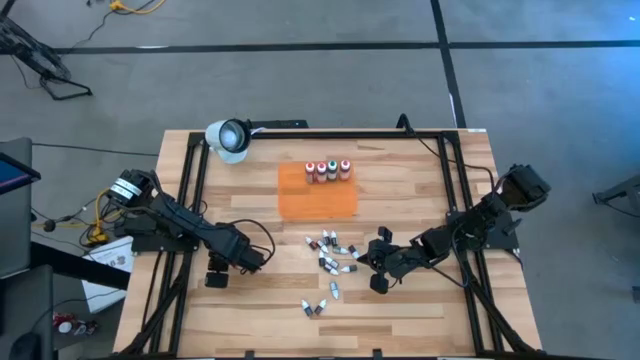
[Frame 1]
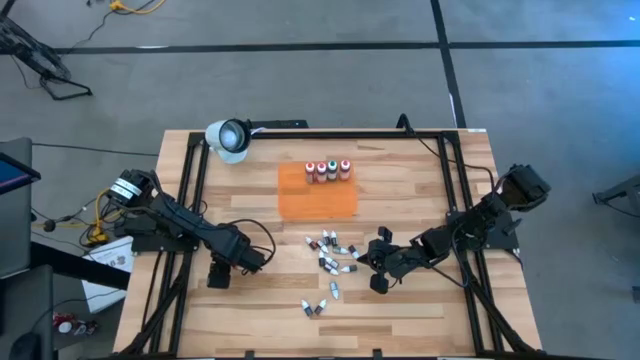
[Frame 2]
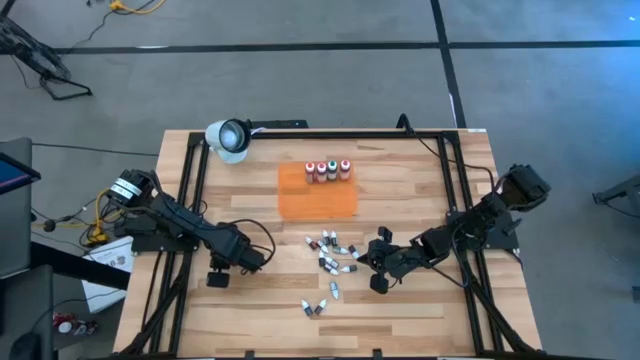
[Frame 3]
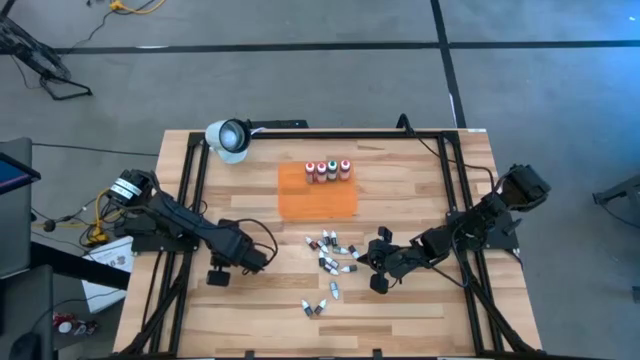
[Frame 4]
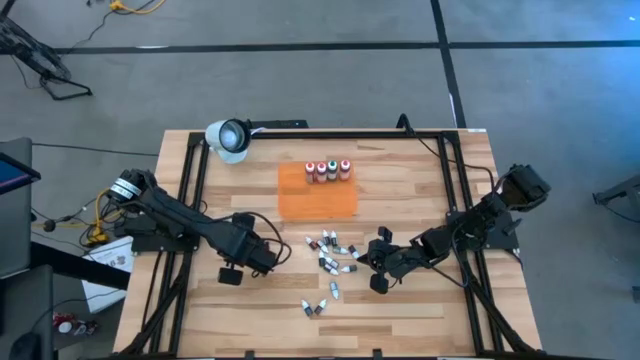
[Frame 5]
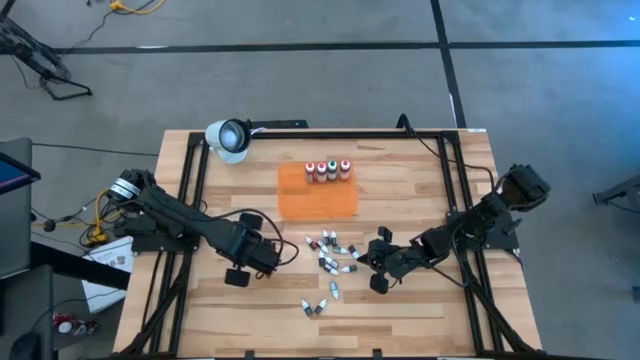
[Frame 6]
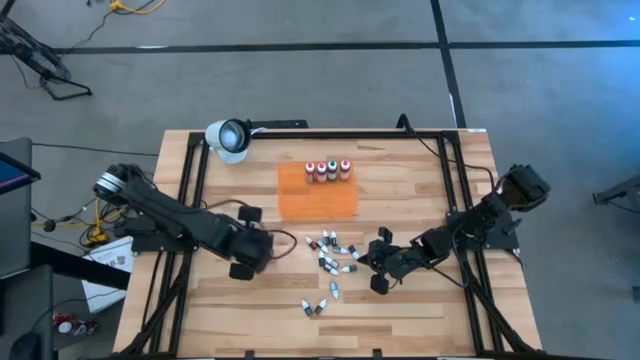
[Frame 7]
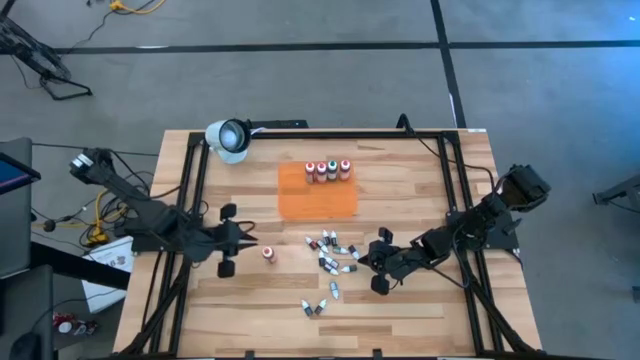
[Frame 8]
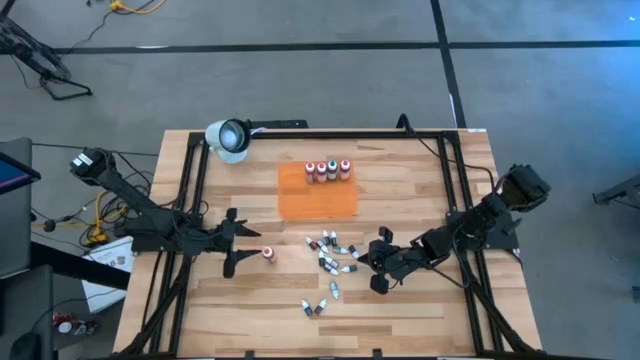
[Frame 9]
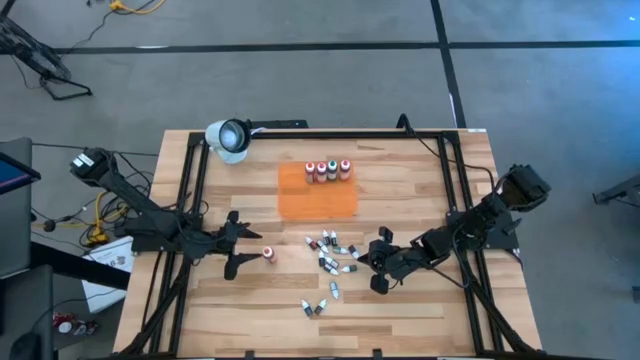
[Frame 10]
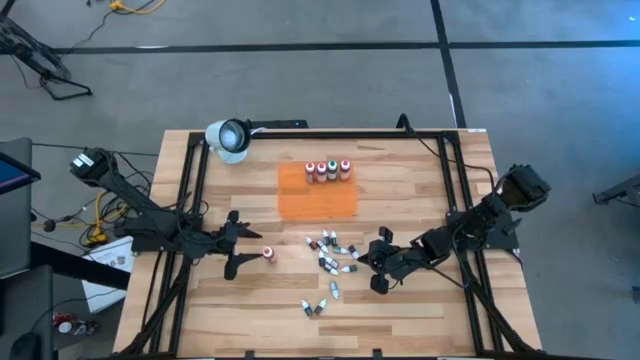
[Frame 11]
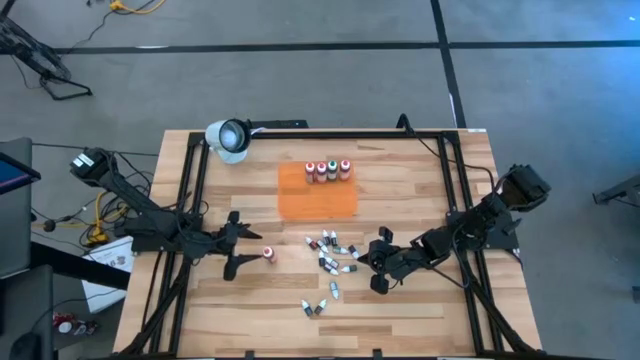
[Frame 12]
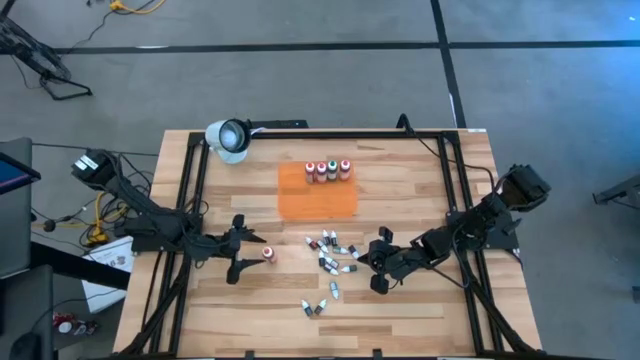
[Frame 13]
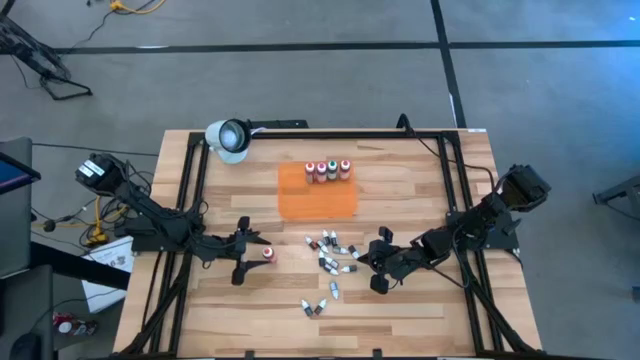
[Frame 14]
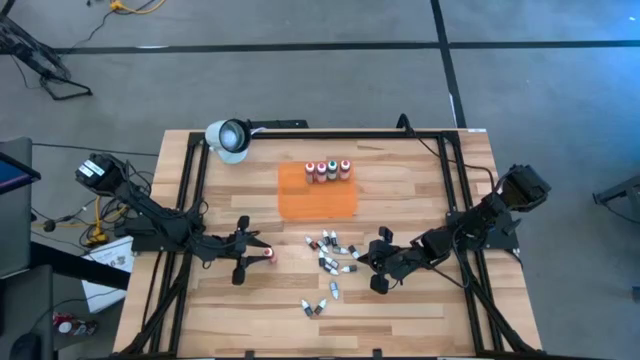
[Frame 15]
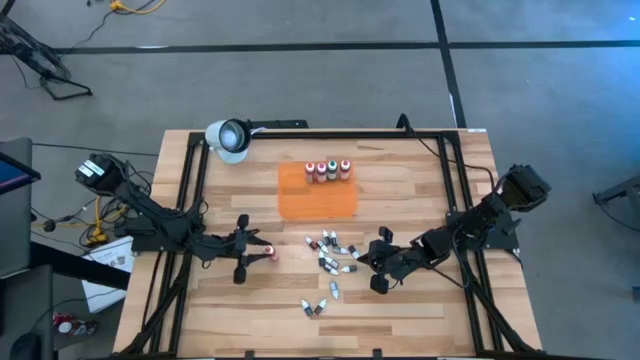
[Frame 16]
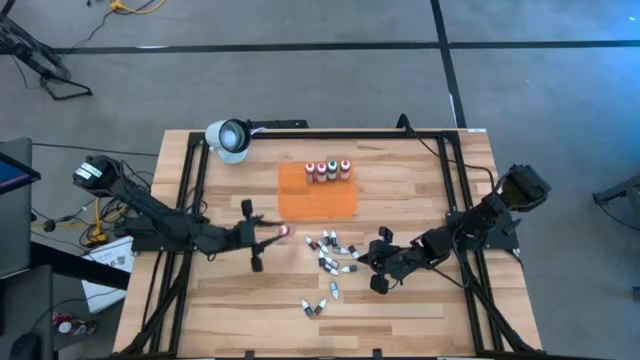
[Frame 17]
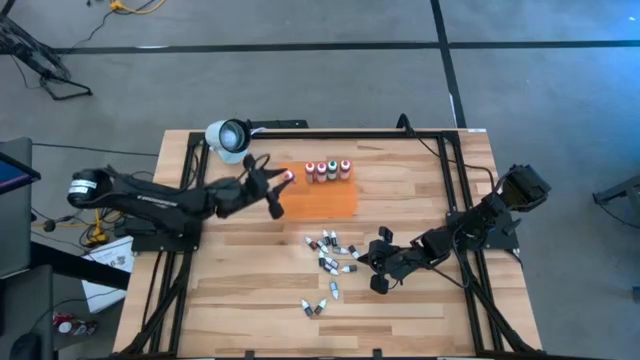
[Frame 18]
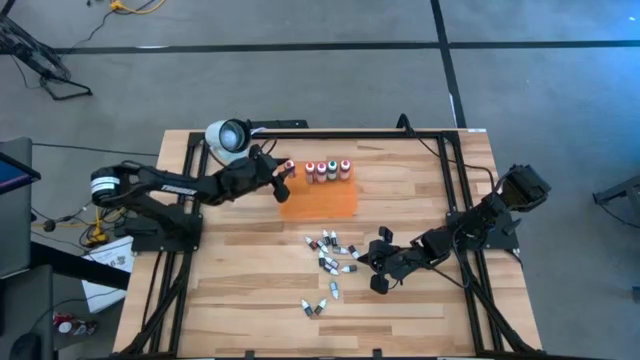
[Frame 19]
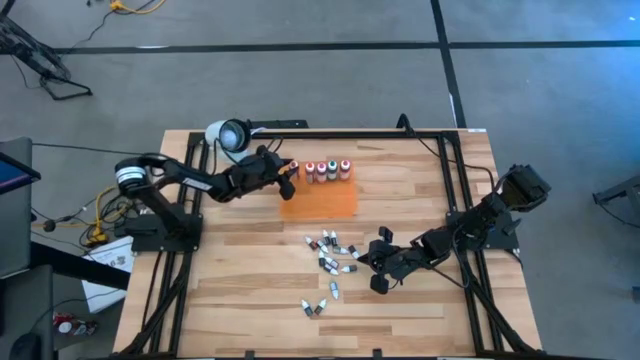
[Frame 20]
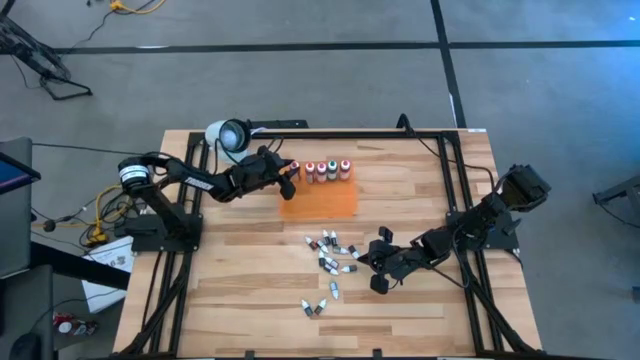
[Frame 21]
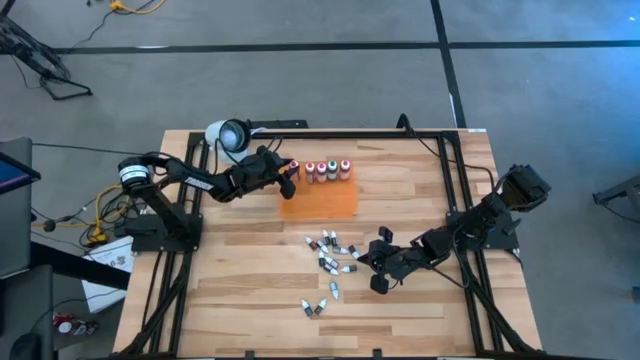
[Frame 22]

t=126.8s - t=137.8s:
Task: Pick & Place food coloring
Put the big orange food coloring bottle into the orange bin

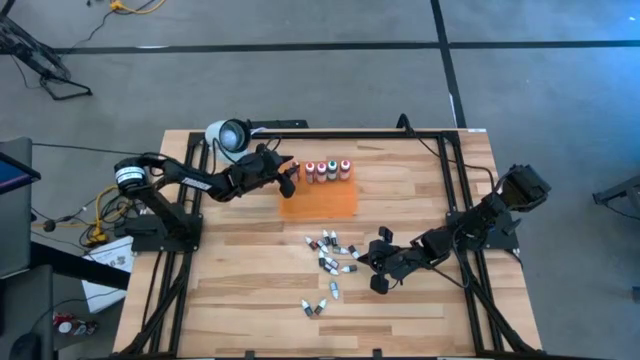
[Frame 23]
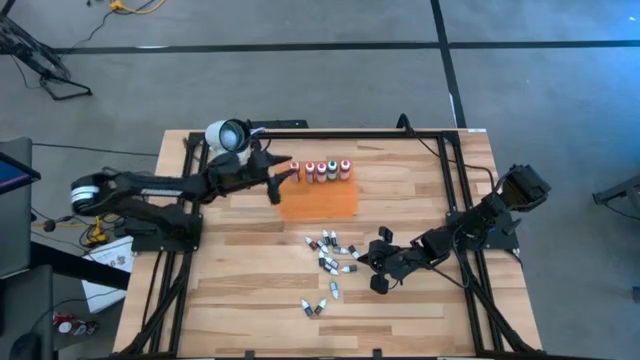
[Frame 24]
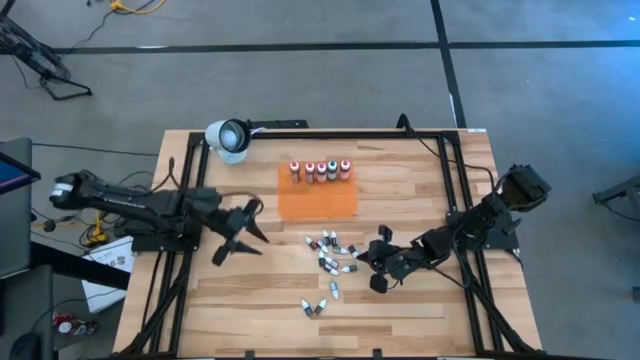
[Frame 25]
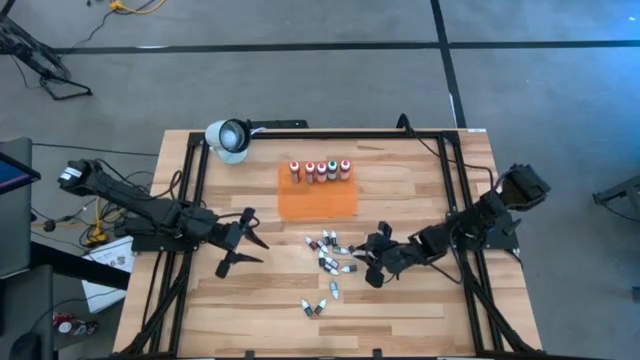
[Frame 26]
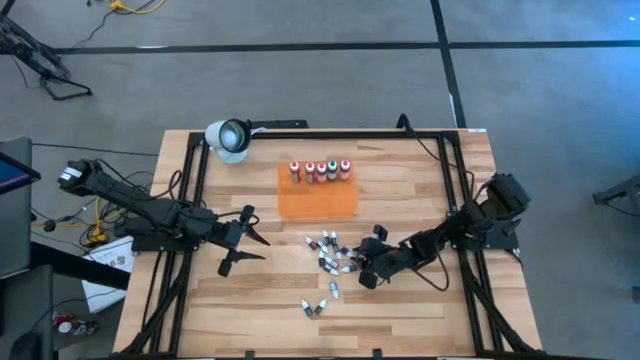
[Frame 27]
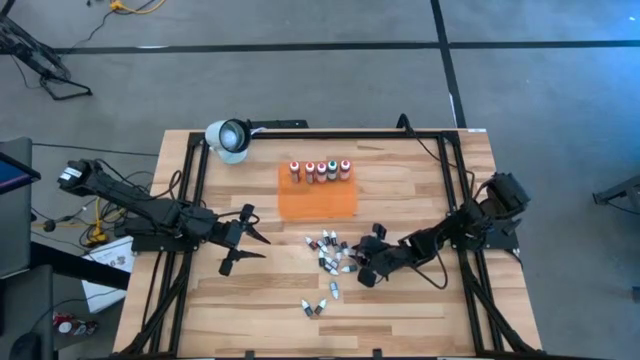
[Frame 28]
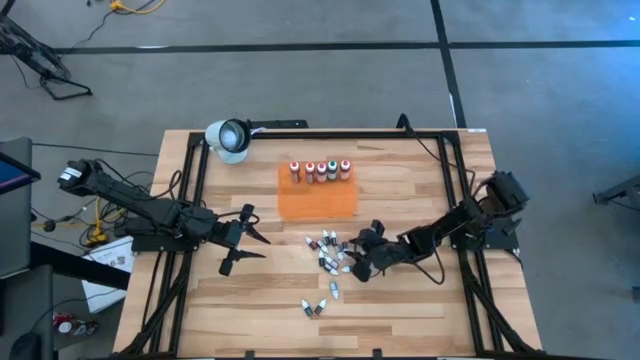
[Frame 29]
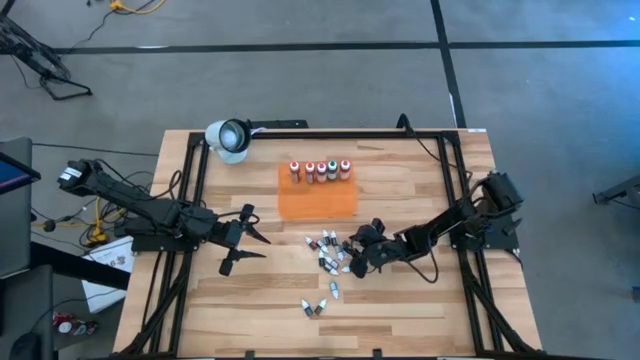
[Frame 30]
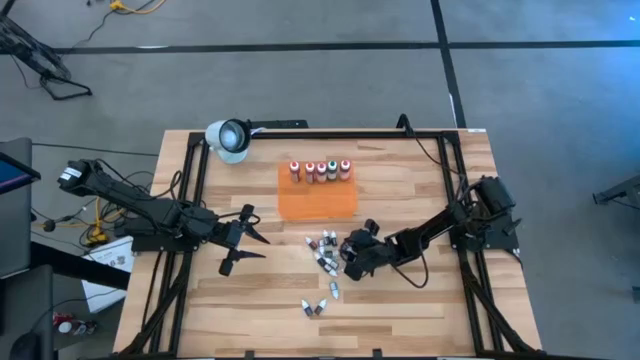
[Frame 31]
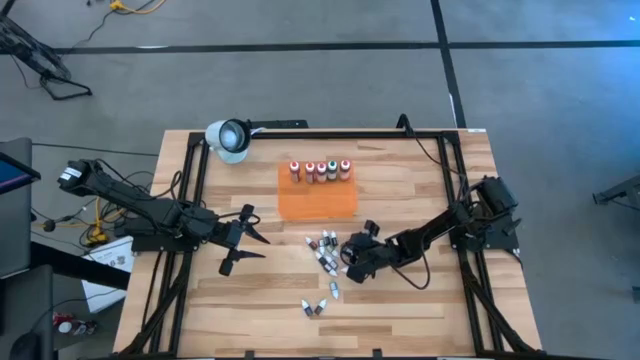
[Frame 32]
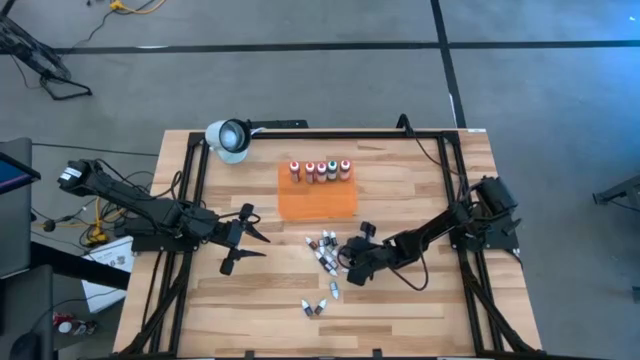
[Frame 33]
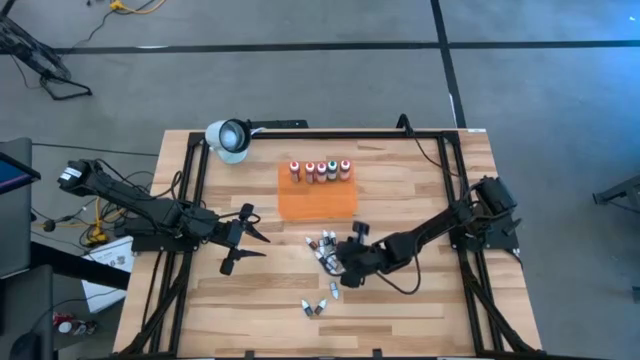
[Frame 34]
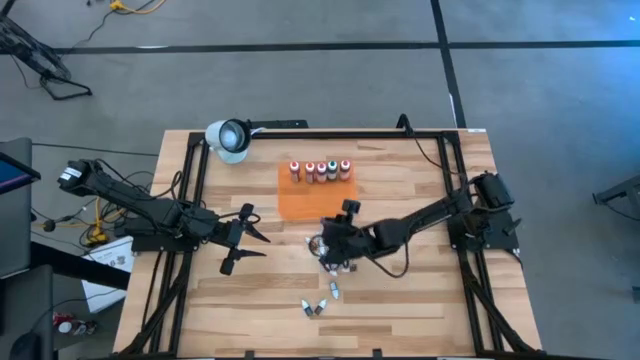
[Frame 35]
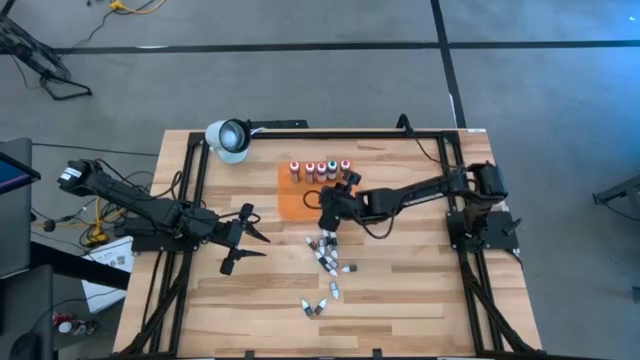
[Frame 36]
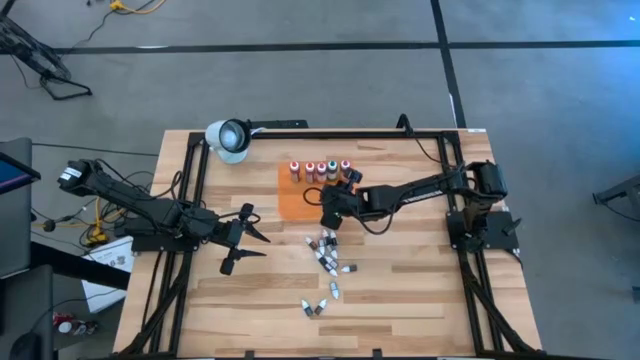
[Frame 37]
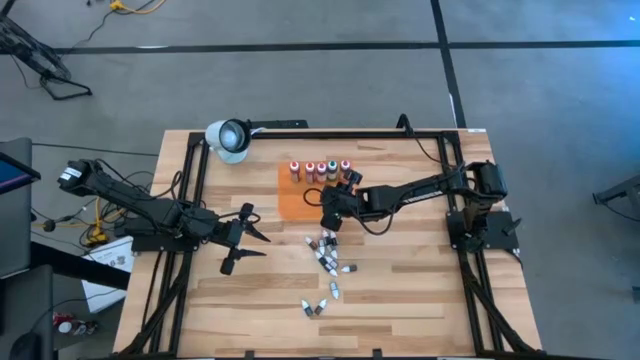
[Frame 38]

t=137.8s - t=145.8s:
Put the small purple food coloring bottle into the orange bin

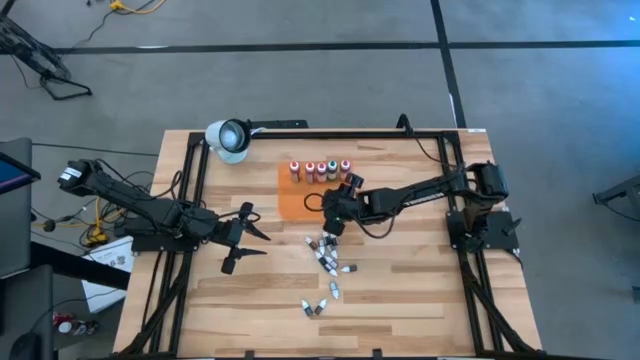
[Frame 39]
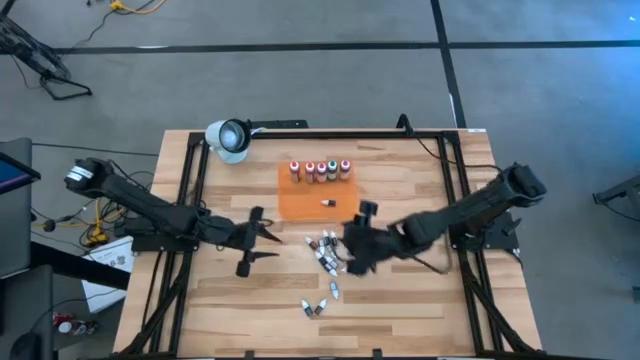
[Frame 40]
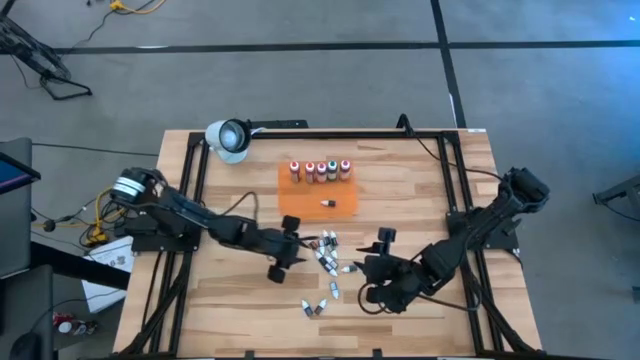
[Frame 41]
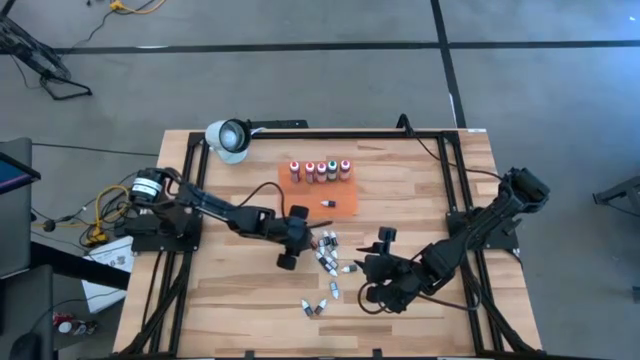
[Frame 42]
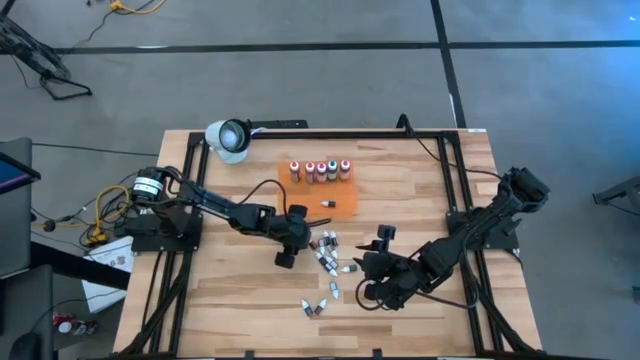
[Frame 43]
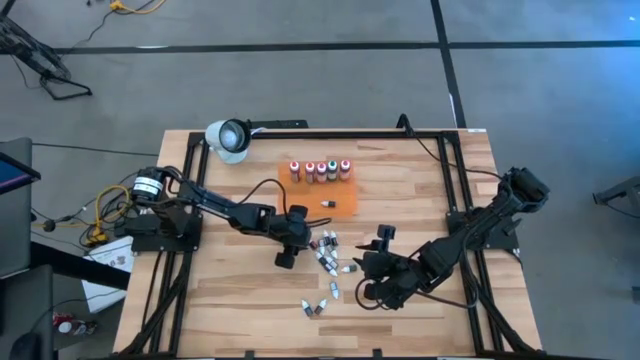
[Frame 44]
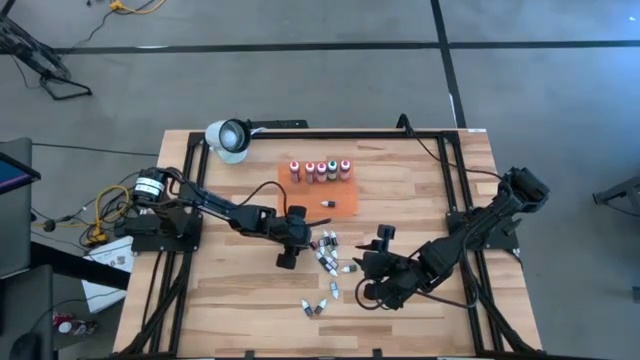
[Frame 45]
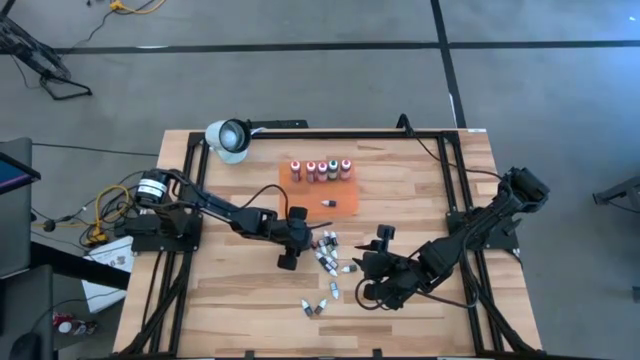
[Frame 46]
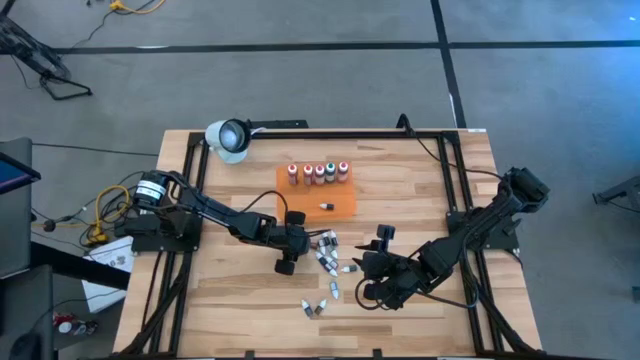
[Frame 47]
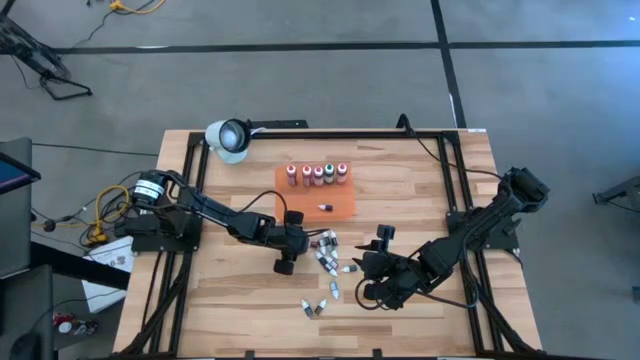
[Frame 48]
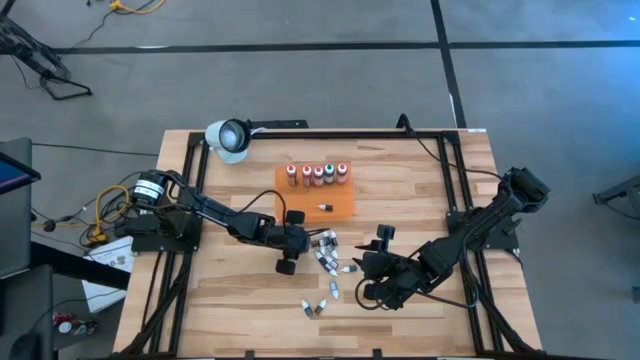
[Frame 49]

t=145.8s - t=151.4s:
Put the small red food coloring bottle into the orange bin
